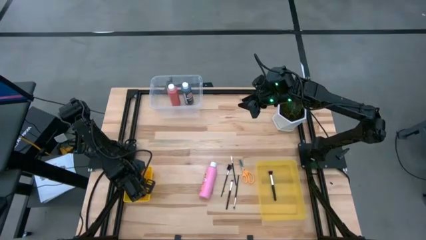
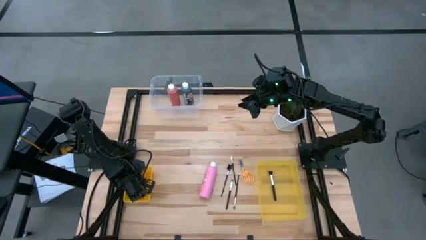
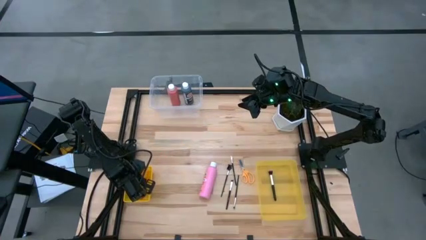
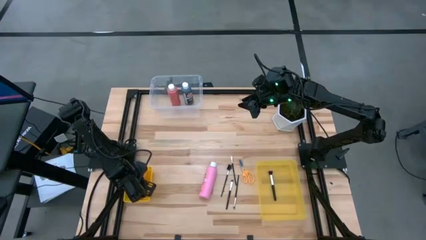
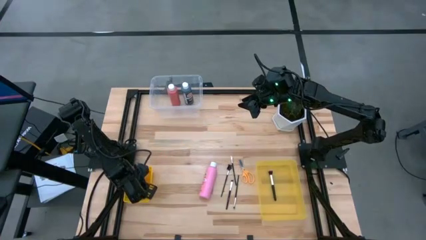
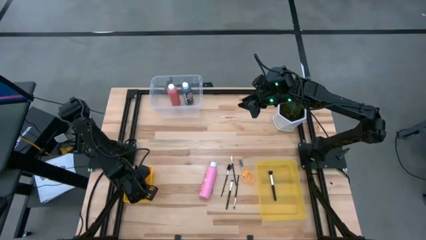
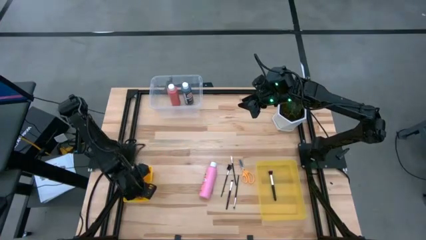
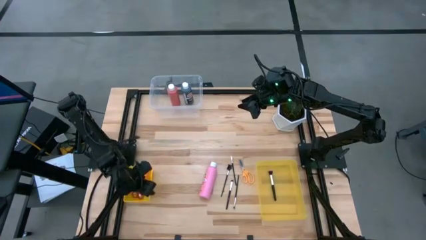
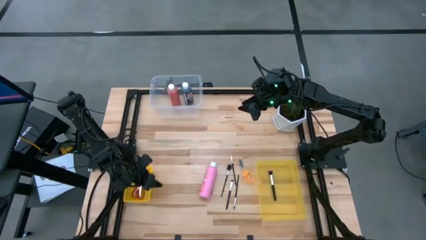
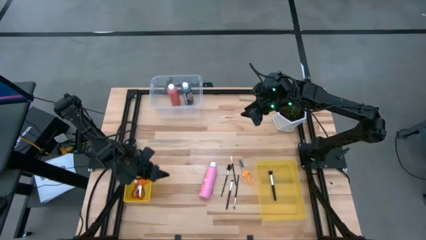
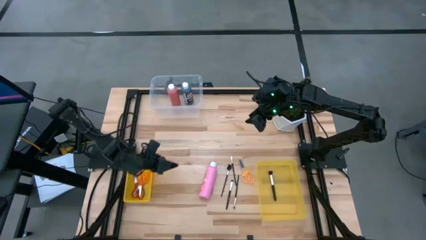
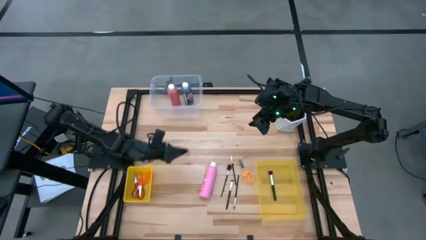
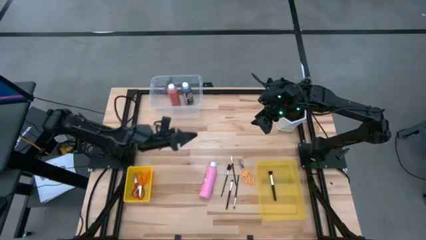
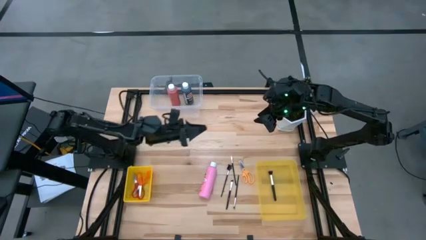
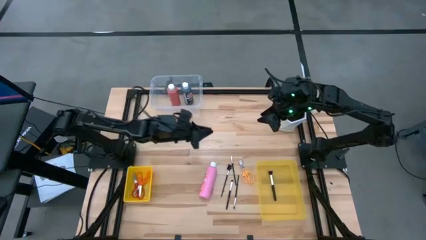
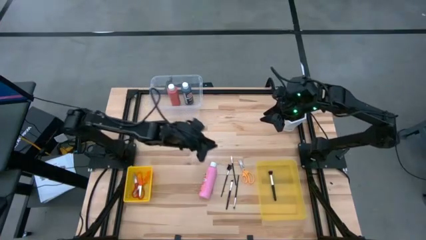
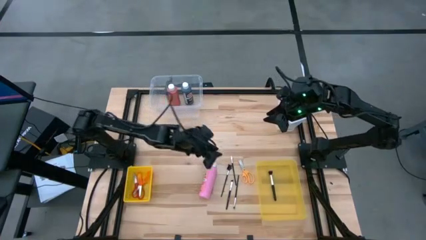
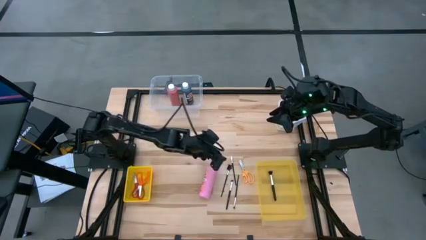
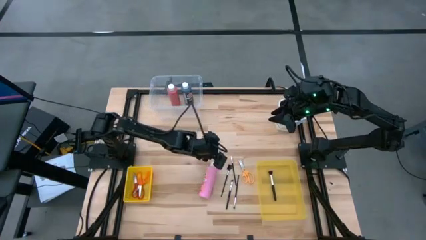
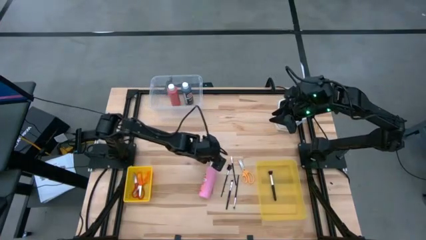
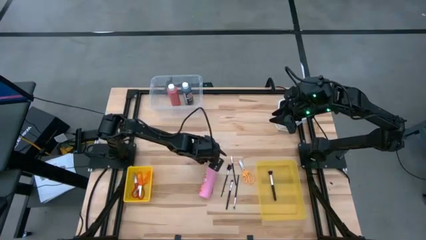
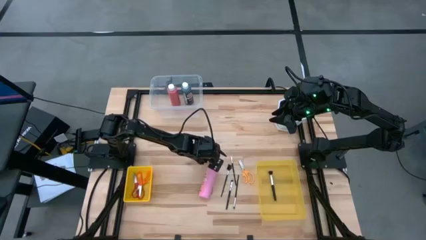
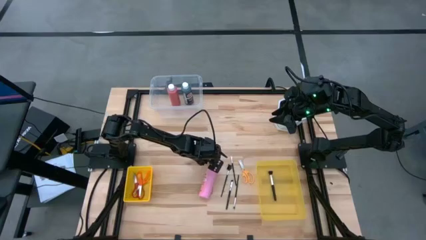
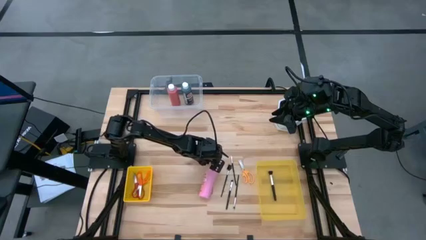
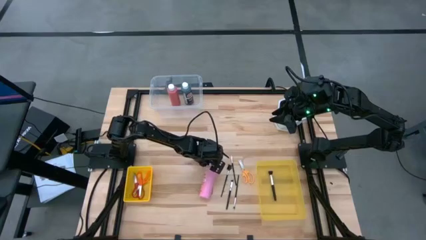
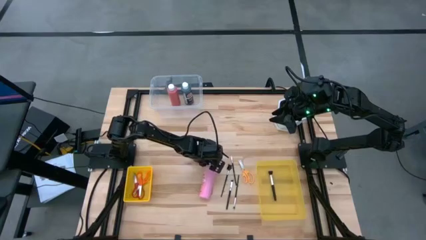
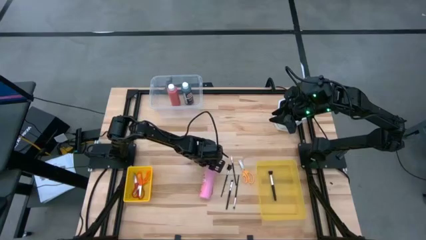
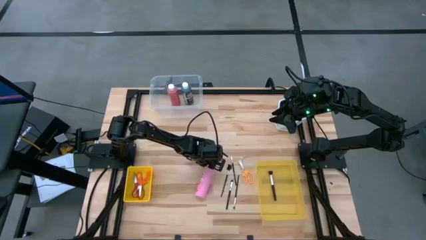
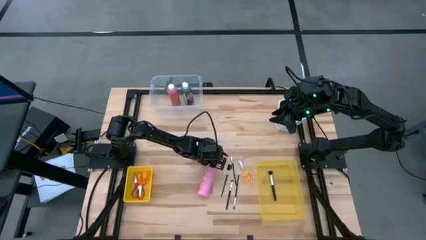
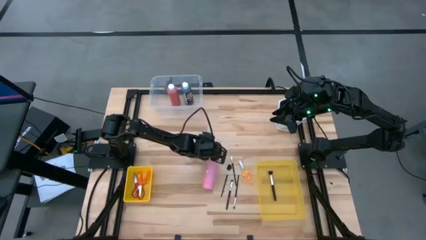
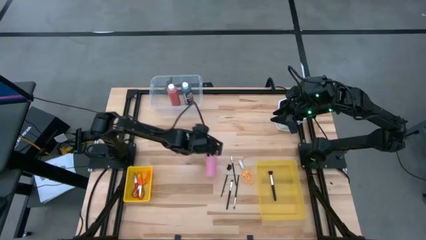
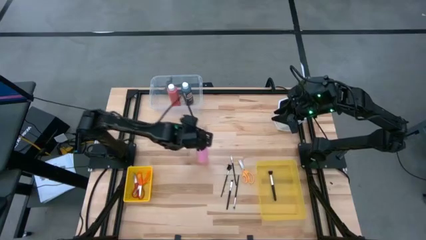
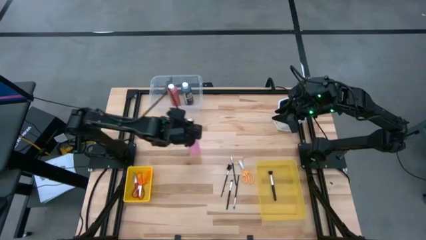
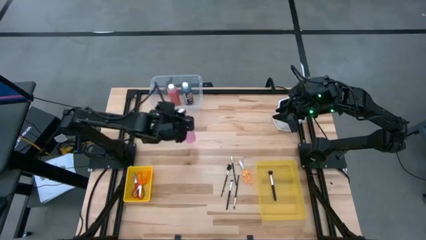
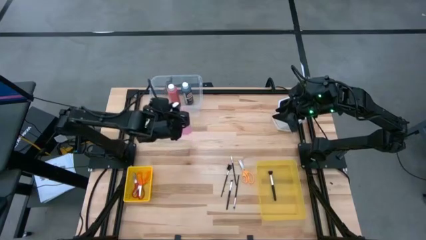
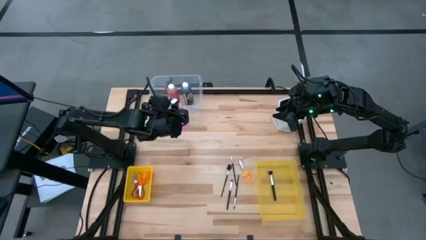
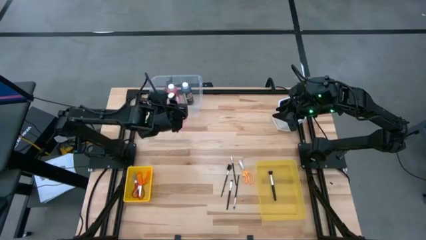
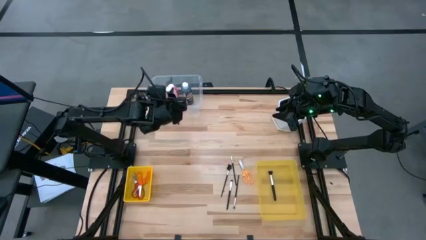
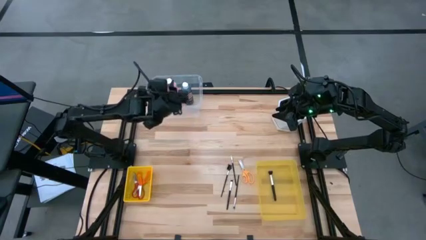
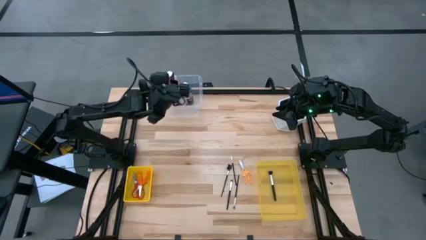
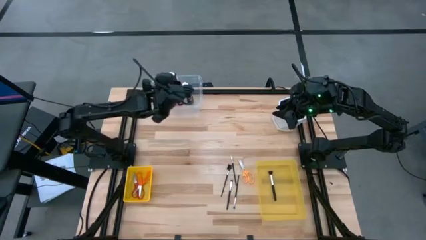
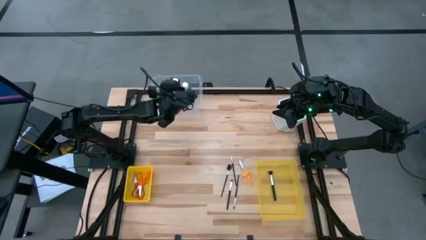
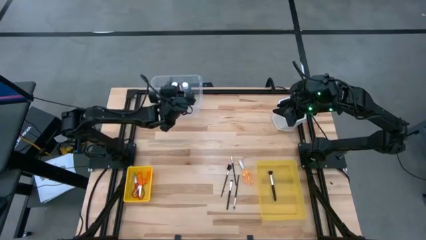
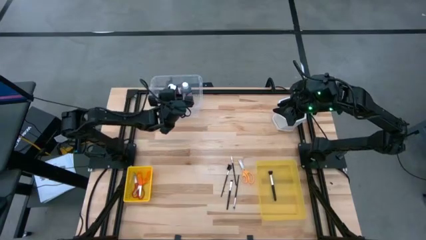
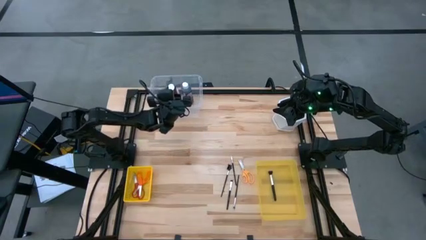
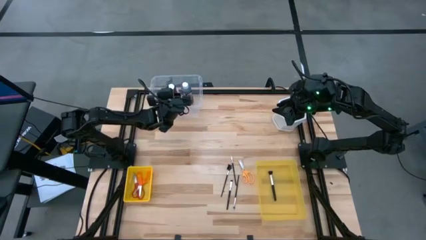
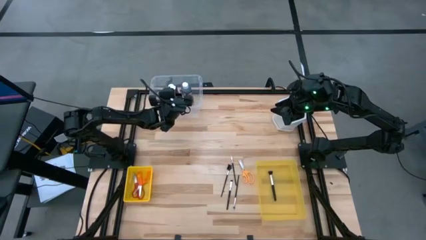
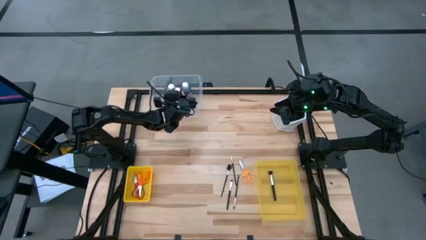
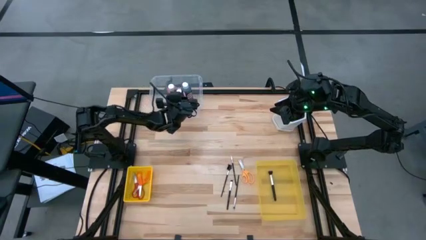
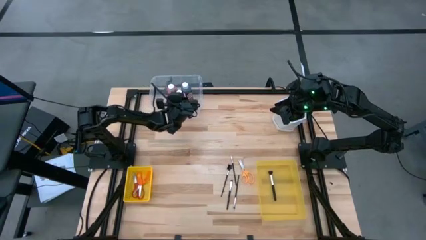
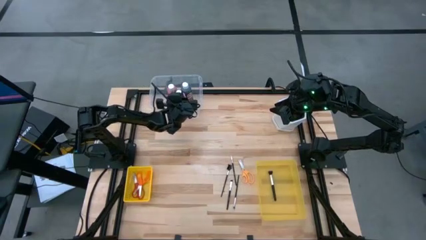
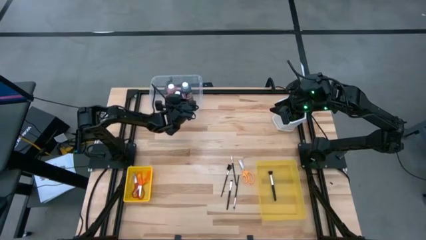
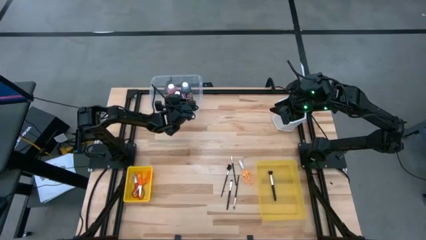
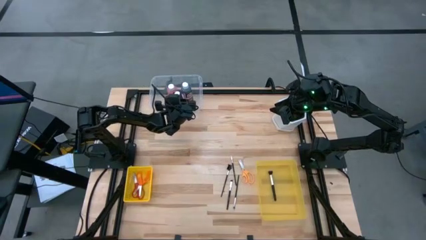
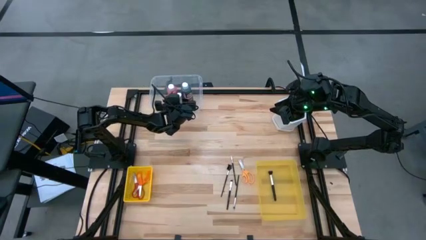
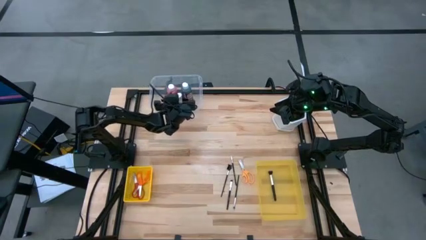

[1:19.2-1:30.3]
Task: Pick & Place Paint Supplies
Put the pink paint bottle into the transparent bin

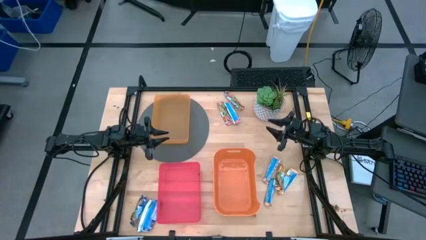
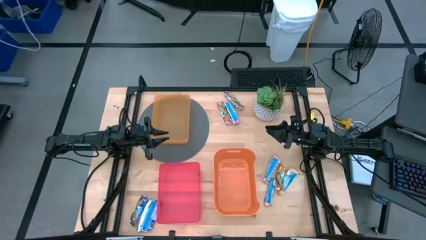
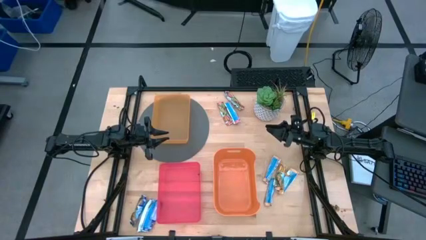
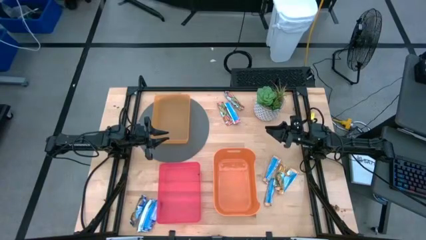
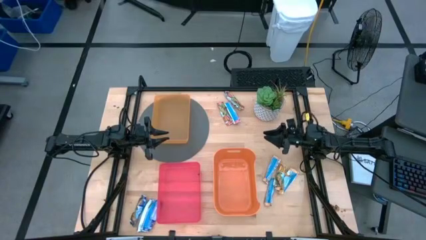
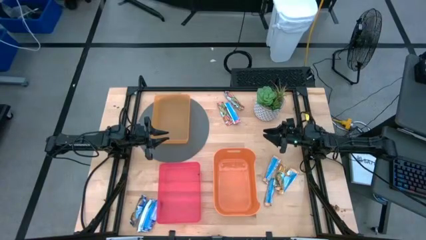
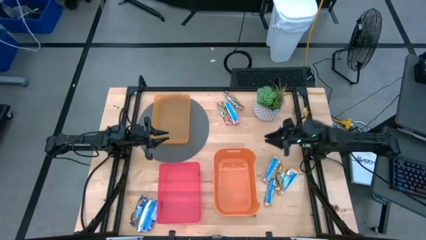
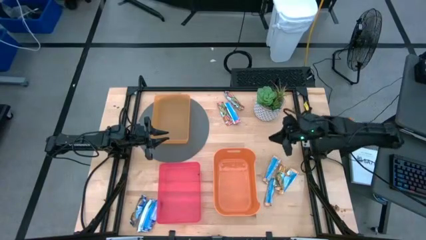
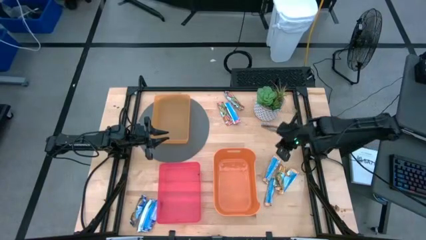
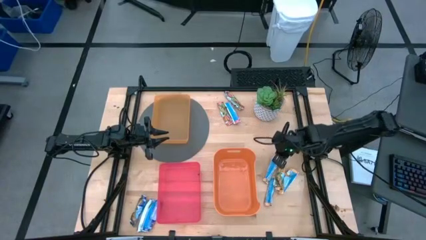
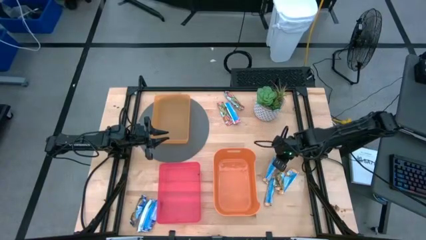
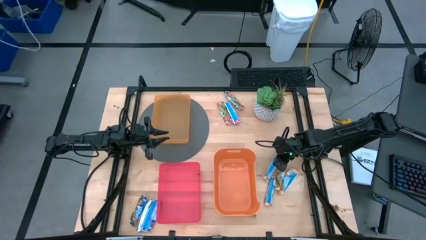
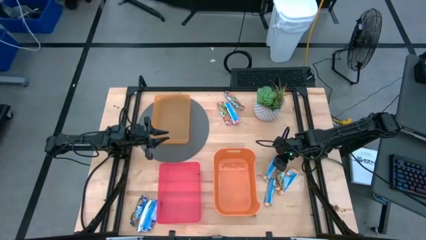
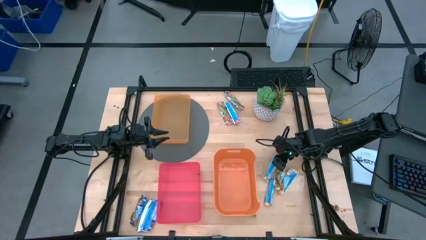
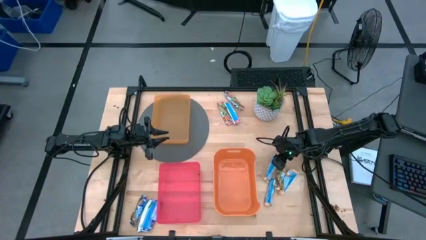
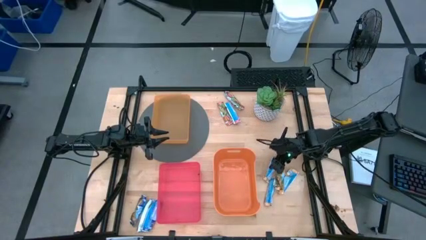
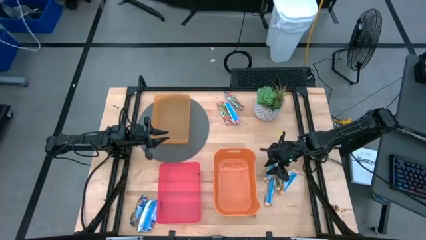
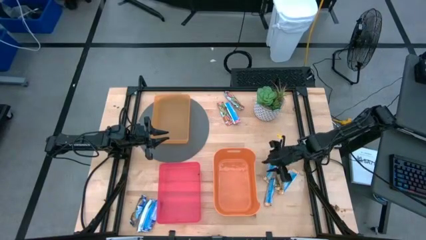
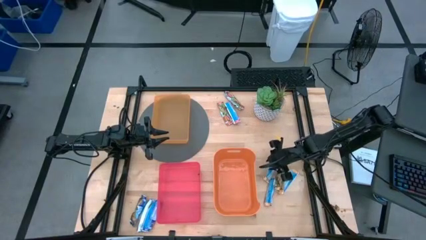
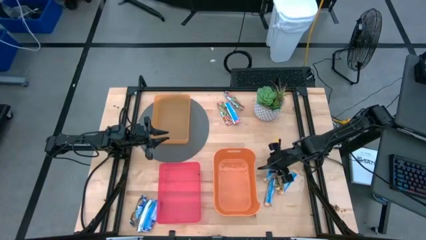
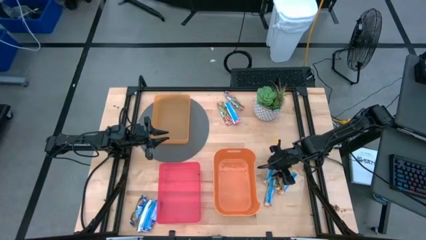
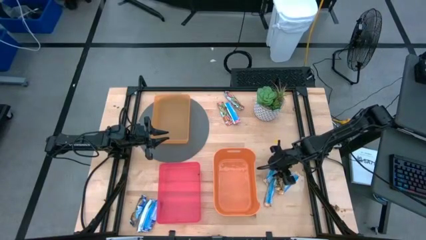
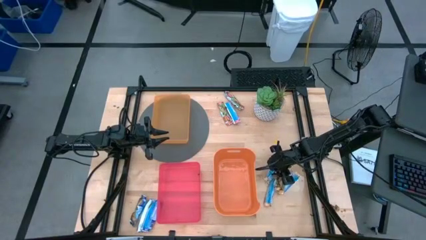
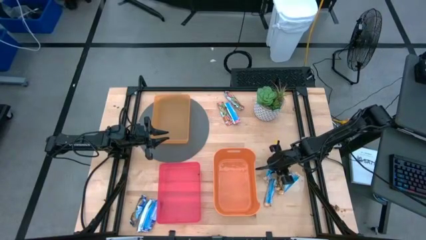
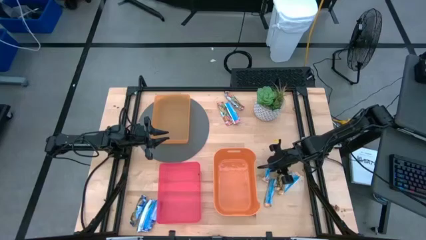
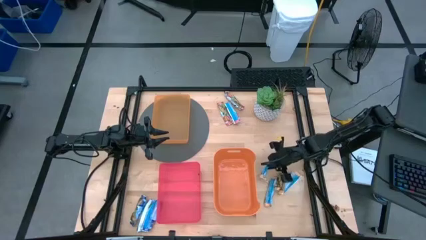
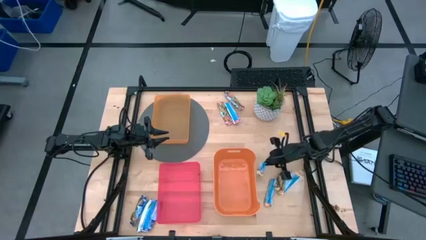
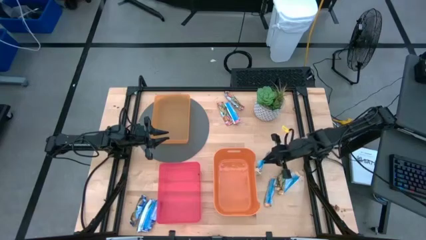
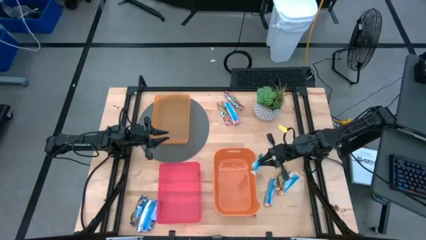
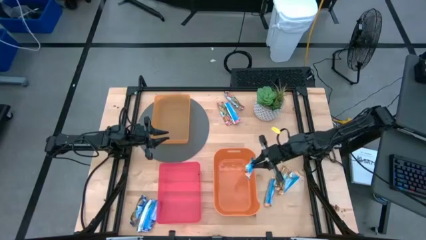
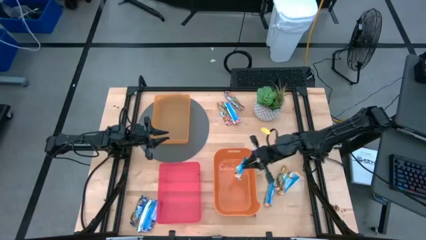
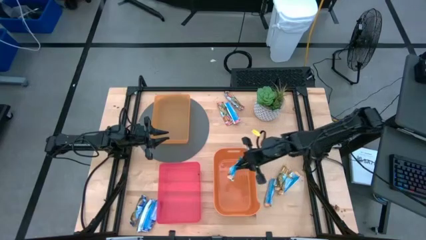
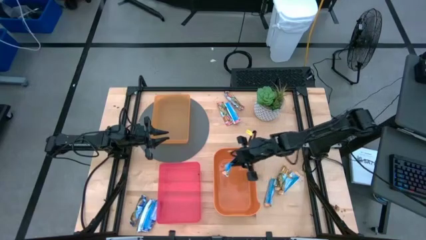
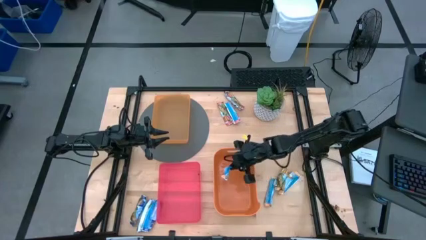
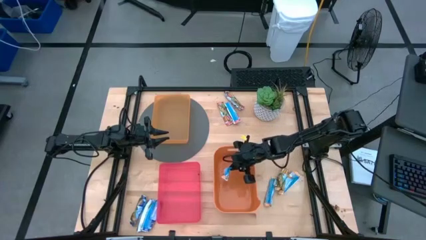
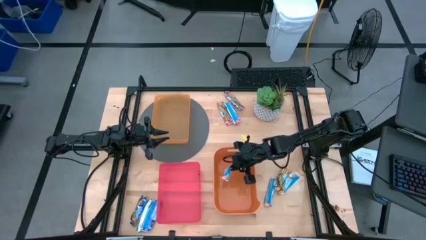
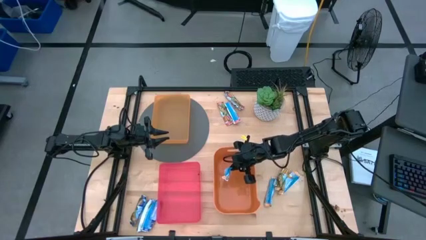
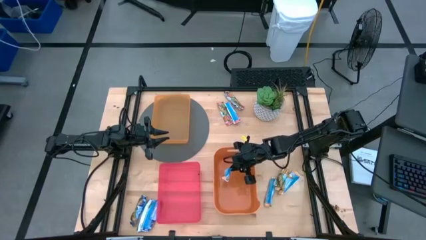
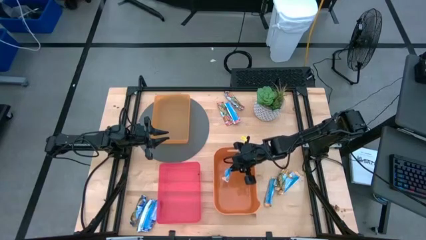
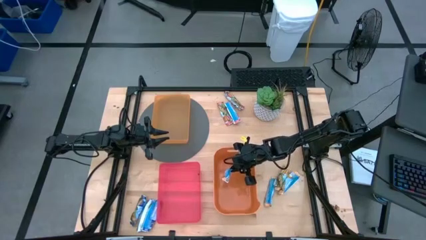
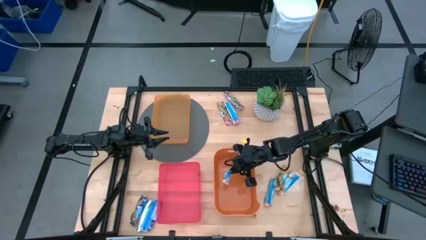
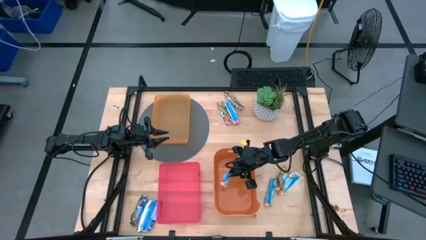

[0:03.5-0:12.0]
Task: Pick and place Granola Bars by type
Put the yellow granola bar into the orange bin
